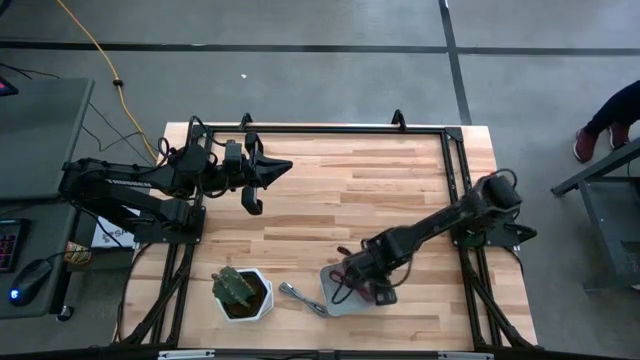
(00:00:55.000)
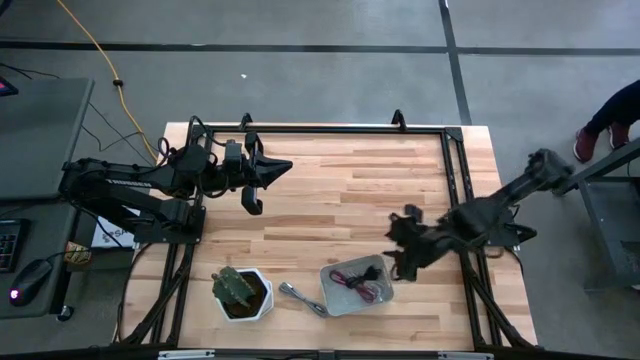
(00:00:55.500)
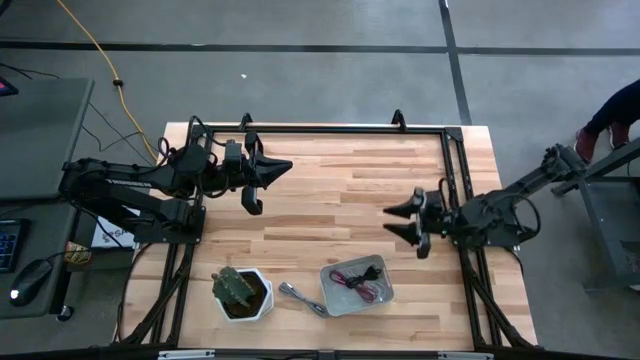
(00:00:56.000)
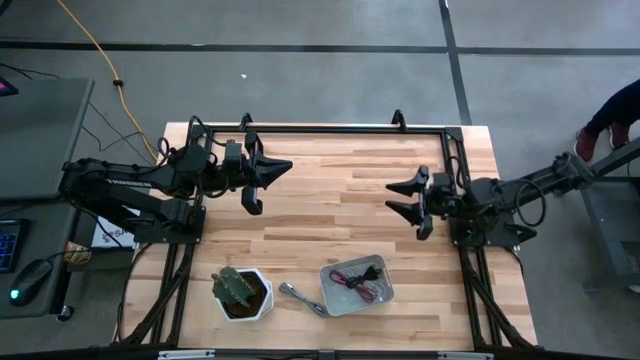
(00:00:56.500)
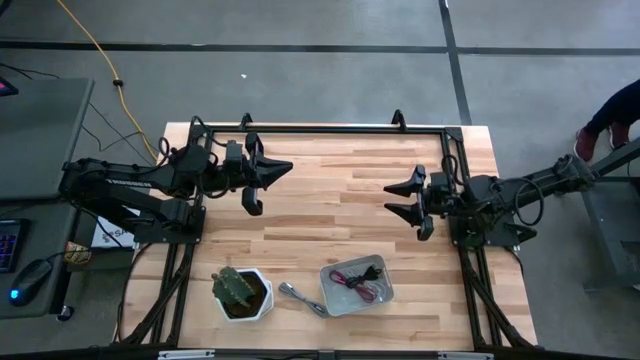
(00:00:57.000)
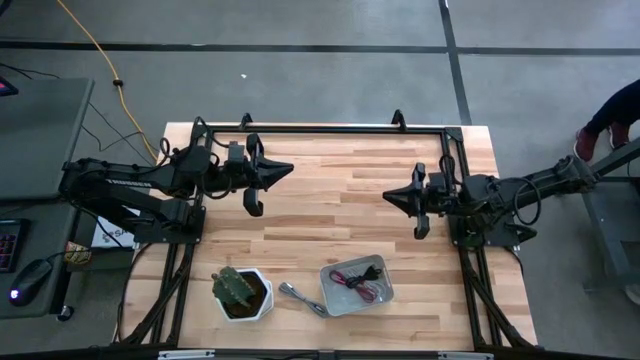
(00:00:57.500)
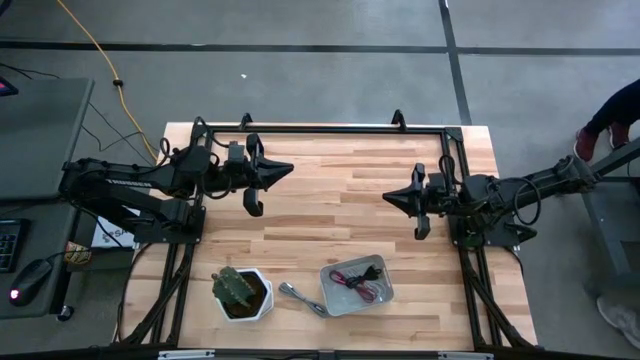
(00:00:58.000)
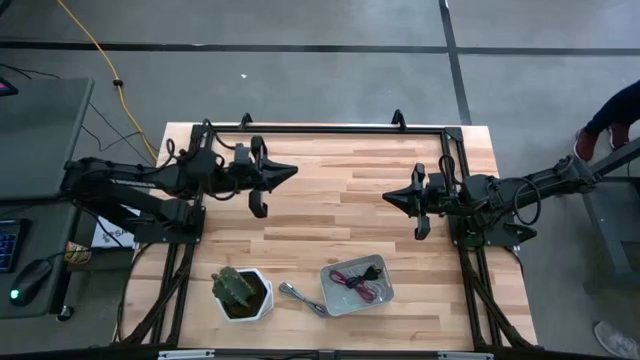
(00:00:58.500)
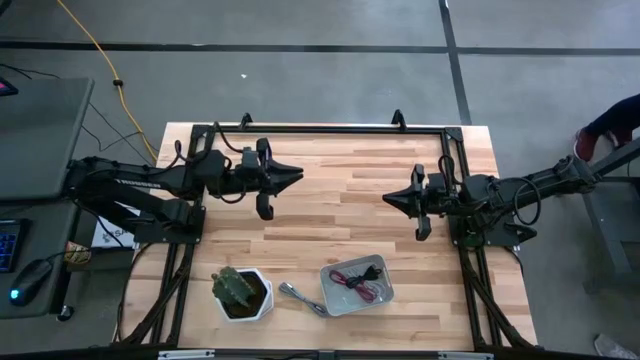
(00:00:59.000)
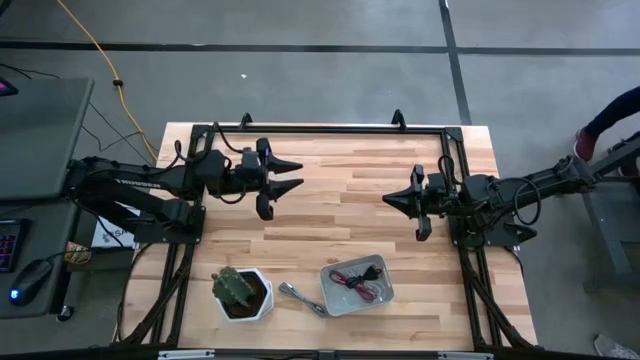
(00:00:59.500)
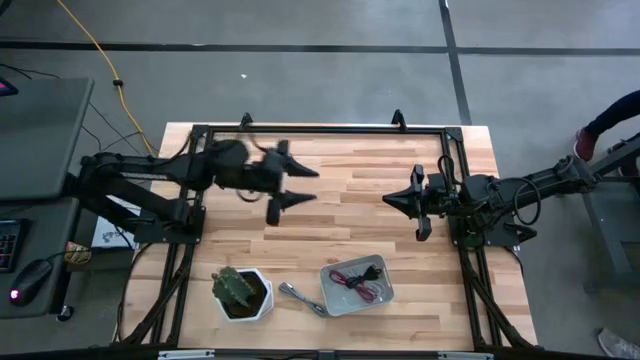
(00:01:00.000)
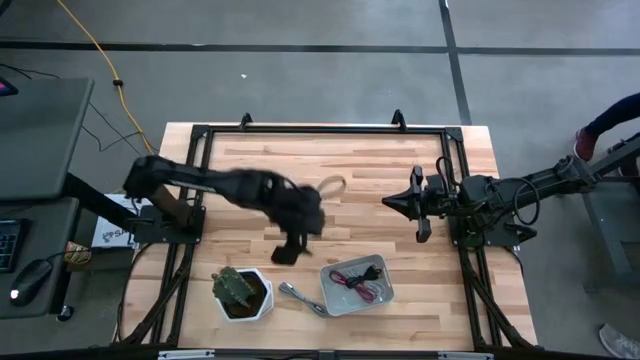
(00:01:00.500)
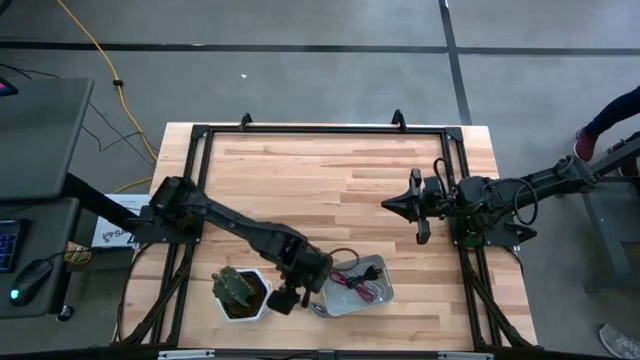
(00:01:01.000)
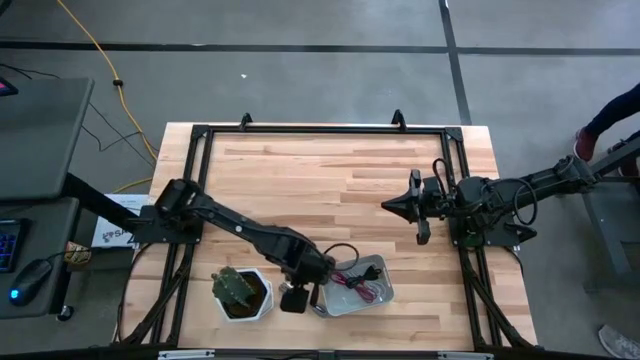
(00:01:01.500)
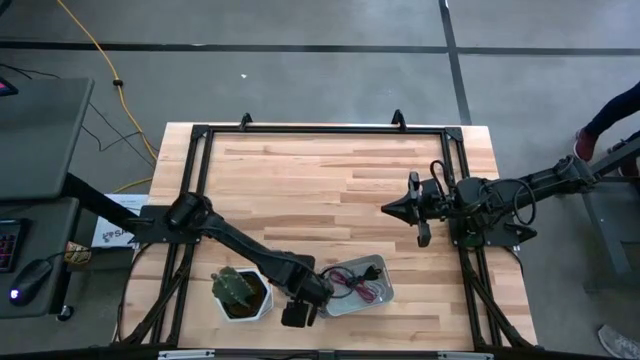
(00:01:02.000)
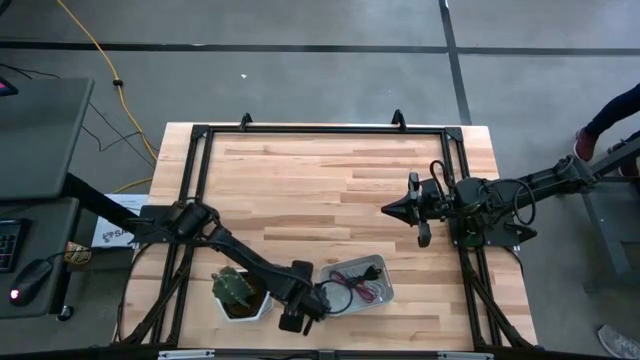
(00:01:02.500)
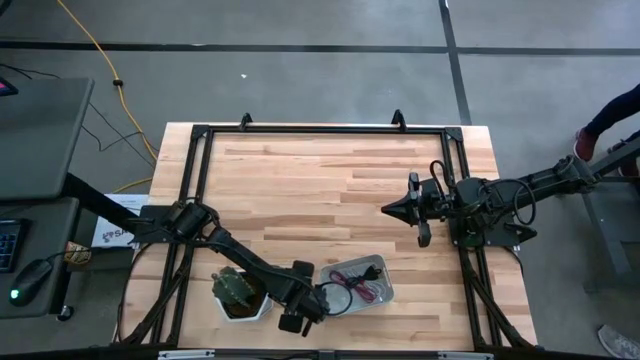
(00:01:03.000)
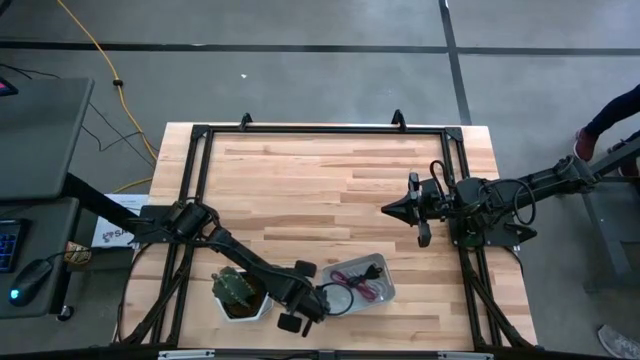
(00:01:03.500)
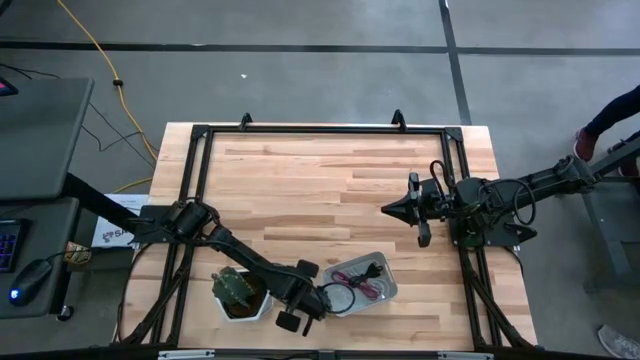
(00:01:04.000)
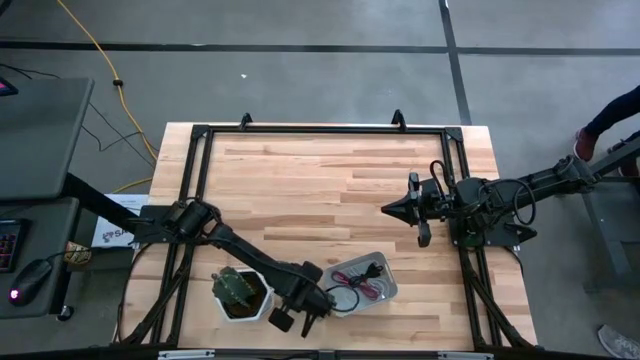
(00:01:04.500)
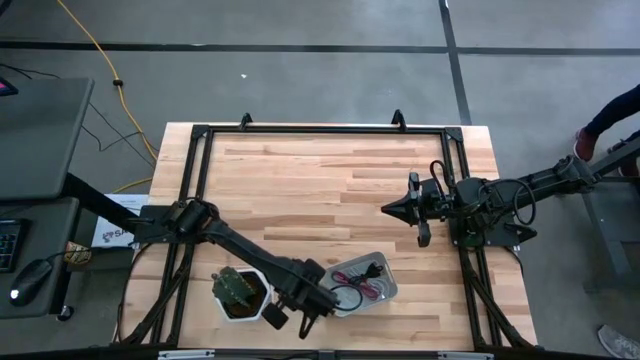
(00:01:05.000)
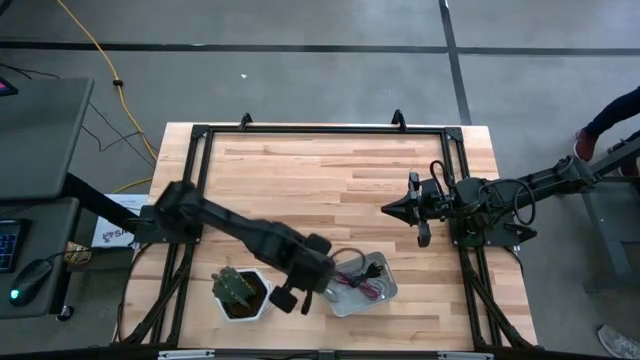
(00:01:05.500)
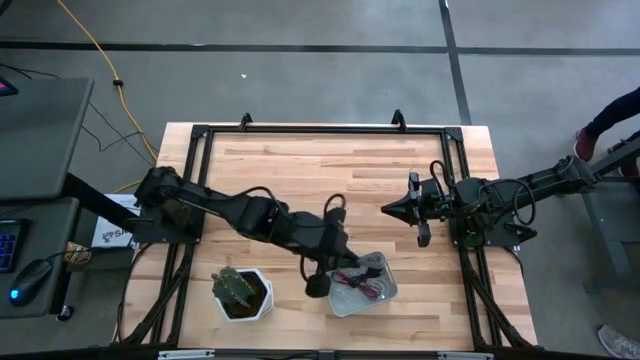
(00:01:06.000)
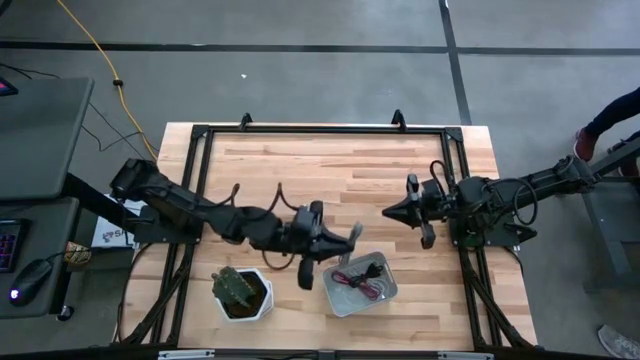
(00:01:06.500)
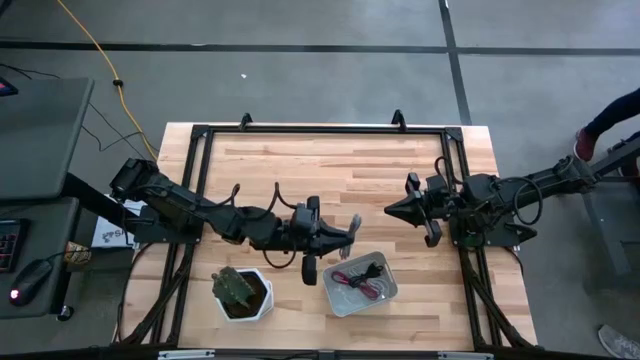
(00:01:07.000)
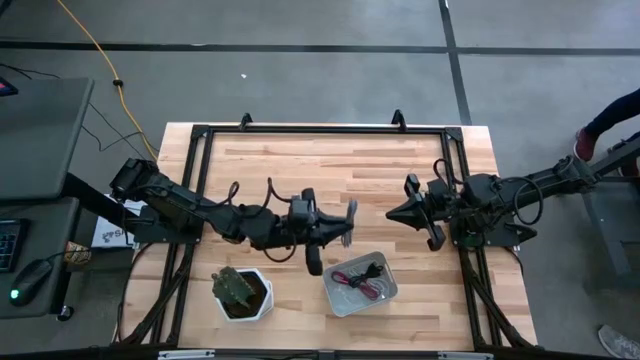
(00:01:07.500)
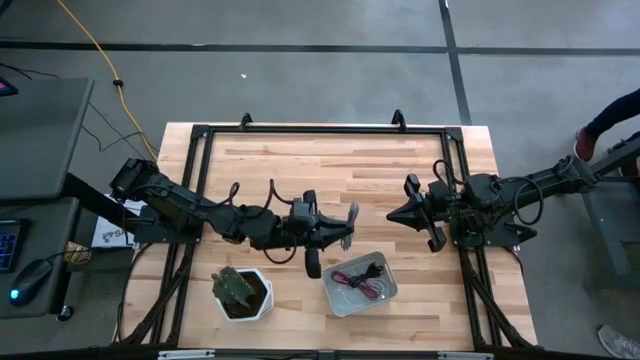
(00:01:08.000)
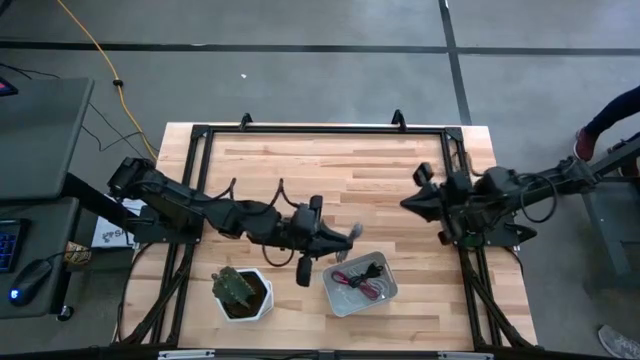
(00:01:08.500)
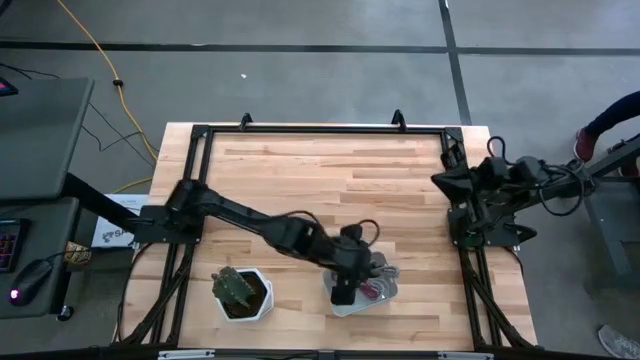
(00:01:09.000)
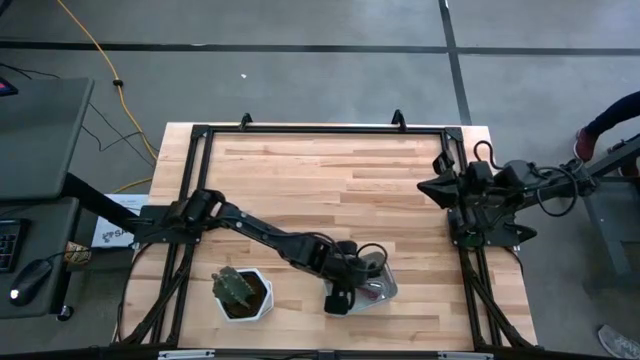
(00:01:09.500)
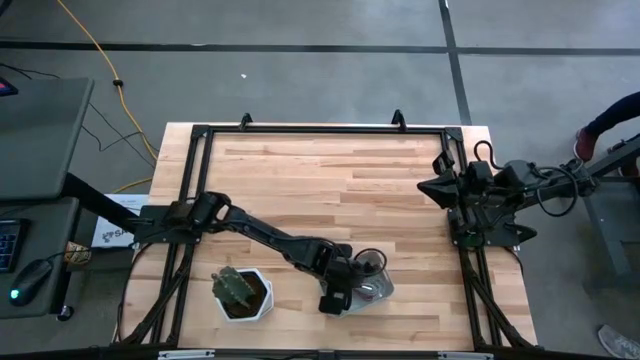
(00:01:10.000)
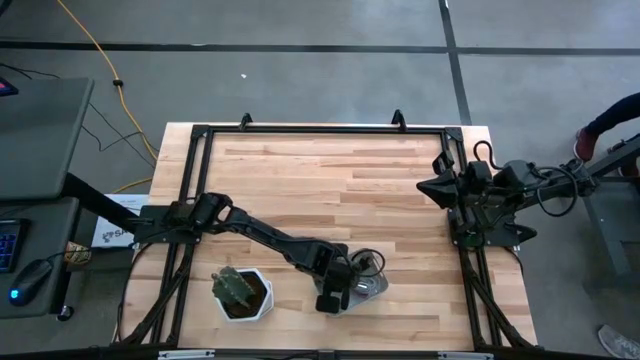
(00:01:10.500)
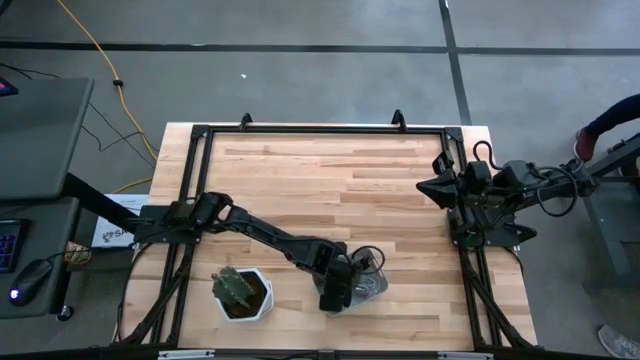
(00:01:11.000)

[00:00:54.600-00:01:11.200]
Task: Pick and place USB-C Cables
Put the black and white charger cable into the gray bin
